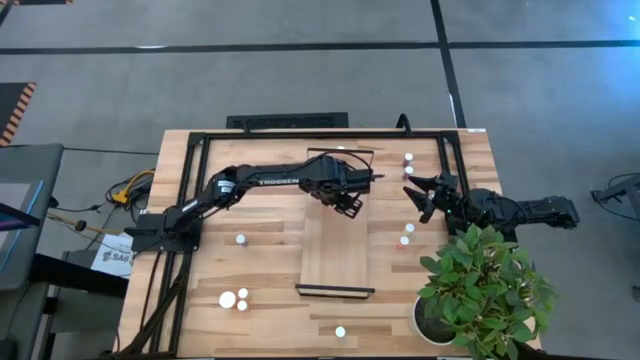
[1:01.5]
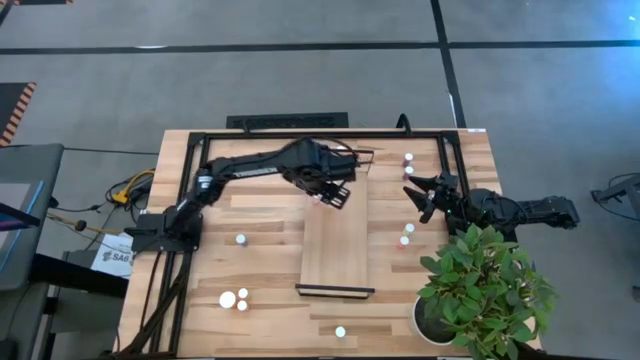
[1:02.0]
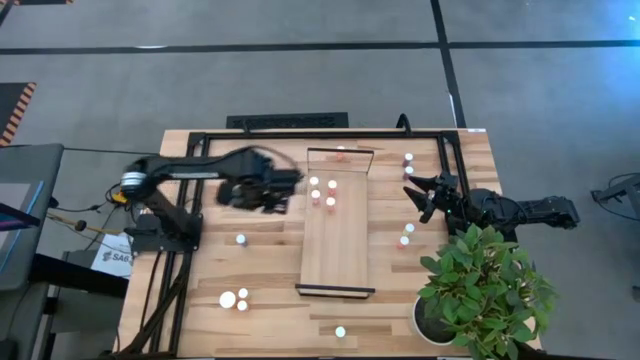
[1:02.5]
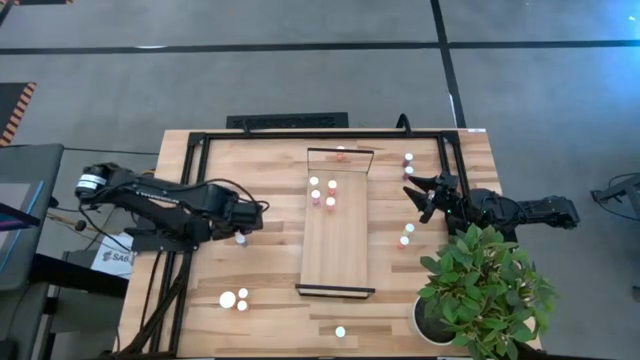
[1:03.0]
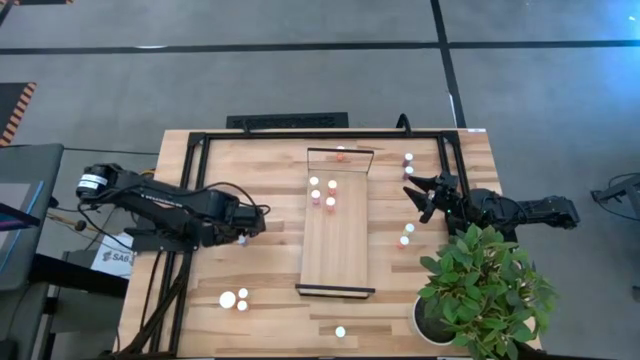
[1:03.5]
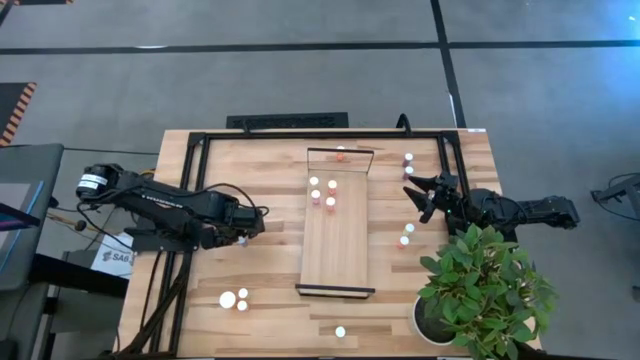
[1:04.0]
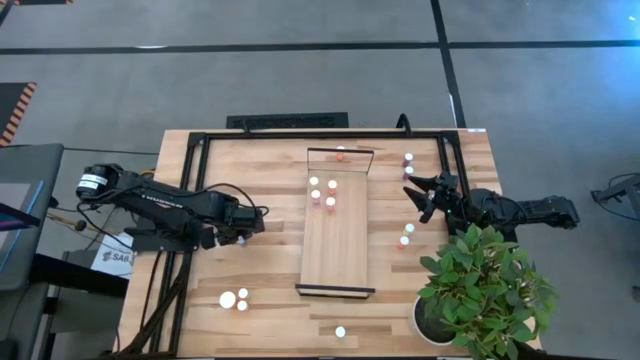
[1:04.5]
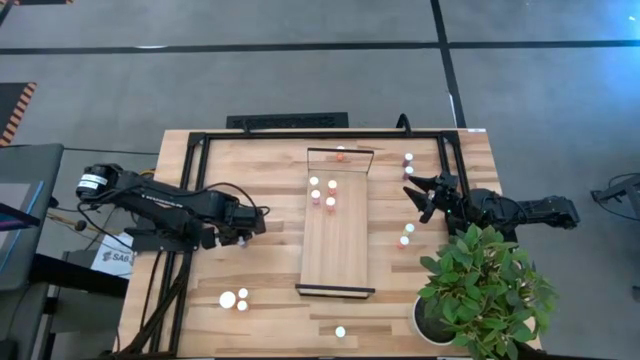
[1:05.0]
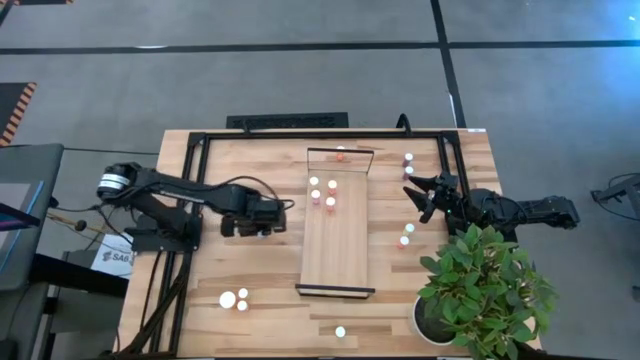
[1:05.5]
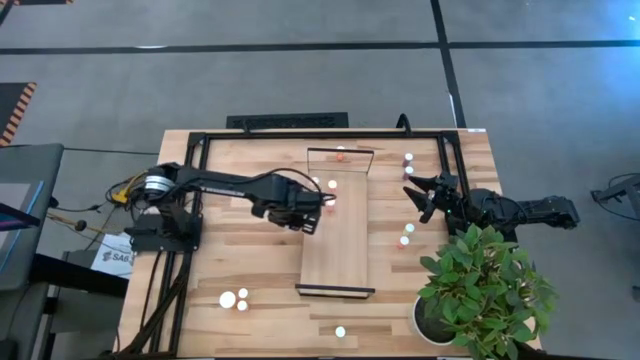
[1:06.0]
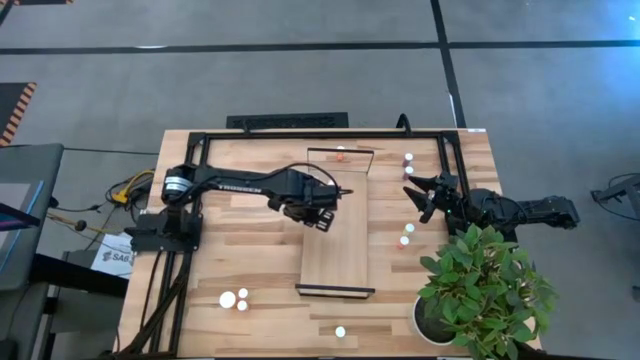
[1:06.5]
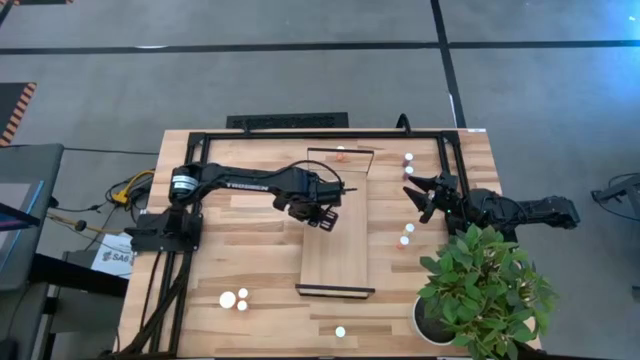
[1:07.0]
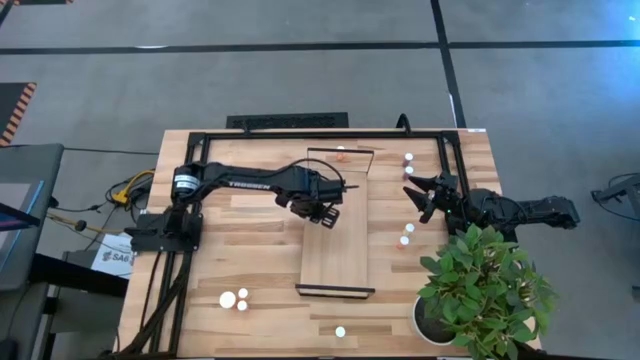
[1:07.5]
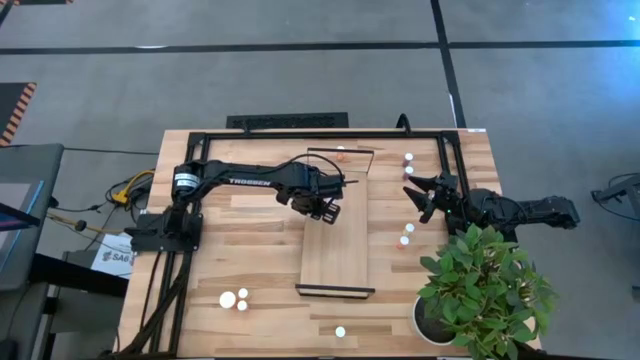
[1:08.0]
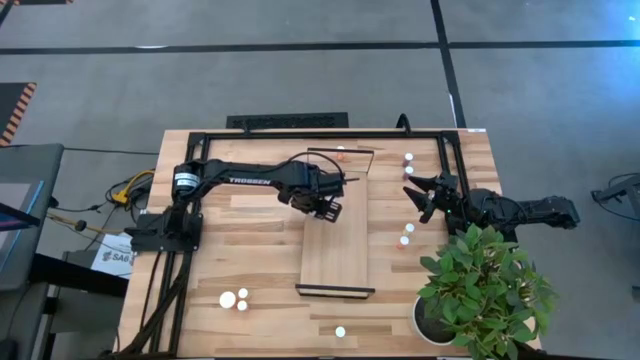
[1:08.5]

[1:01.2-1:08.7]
Task: Pick and place medicine bottles onto shelf by color
Put the blue pill bottle on the shelf

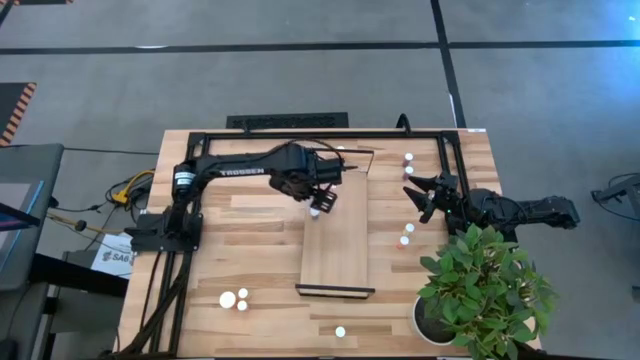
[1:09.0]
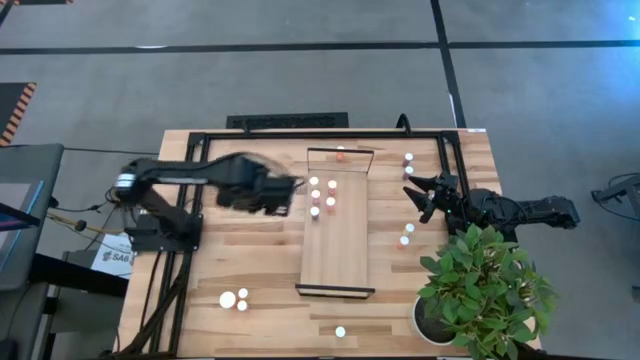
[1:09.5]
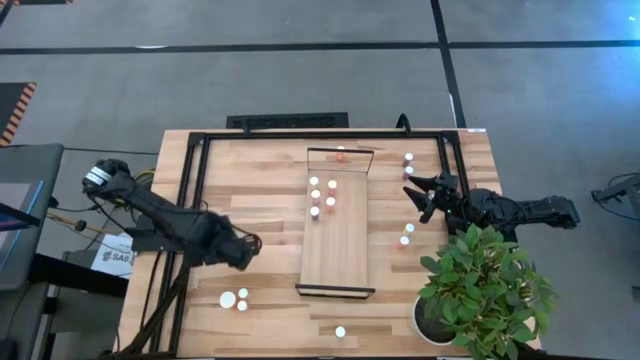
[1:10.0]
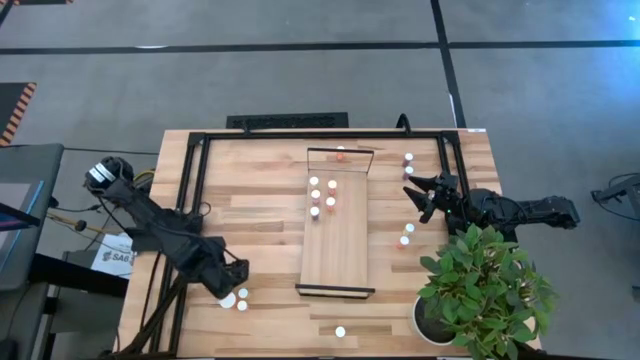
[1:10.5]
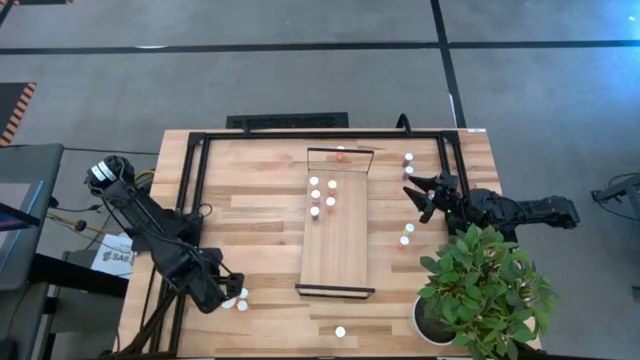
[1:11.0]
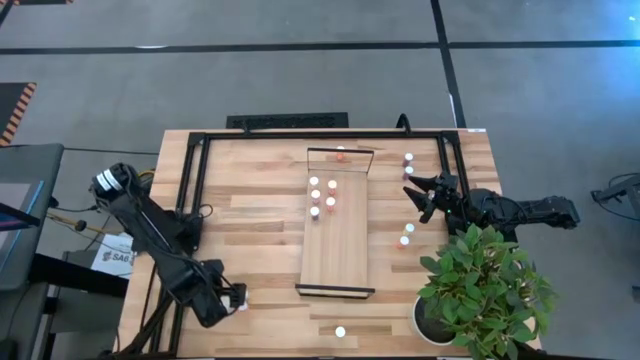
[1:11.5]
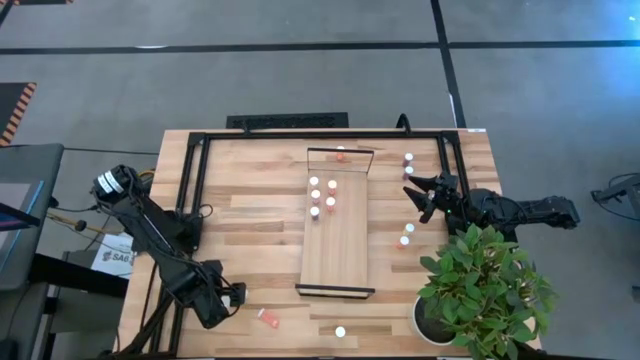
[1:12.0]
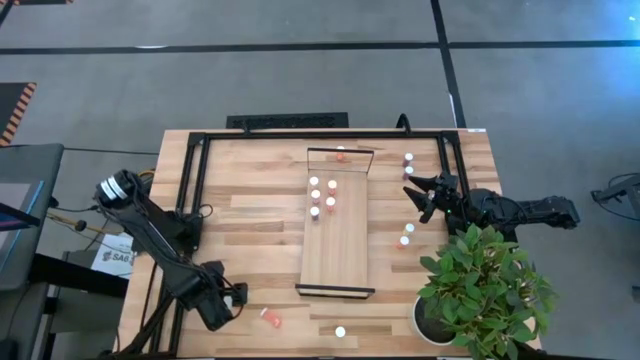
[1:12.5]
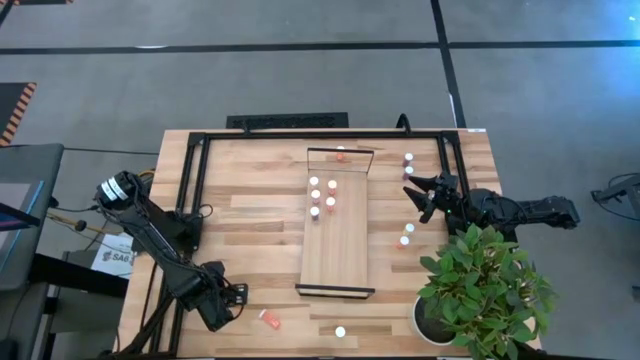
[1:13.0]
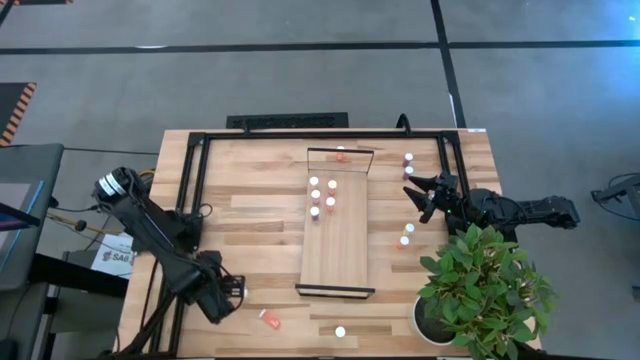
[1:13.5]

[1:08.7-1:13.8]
Put the orange pill bottle on the shelf

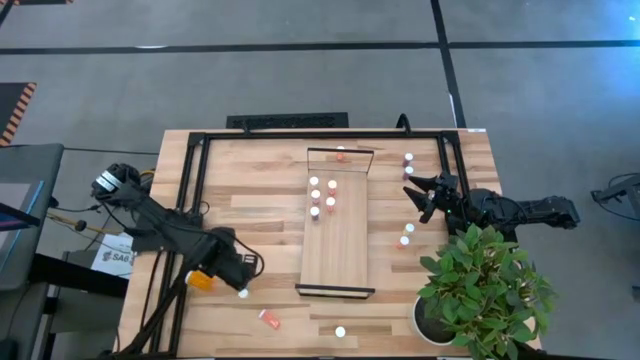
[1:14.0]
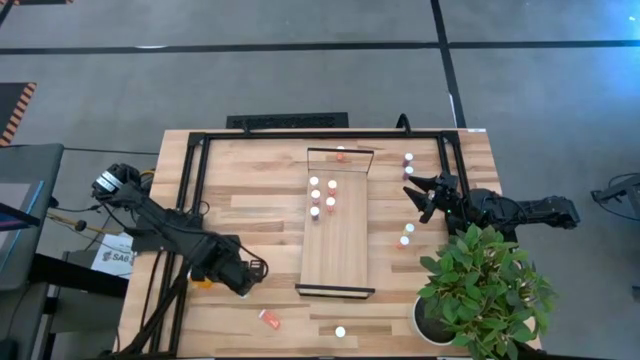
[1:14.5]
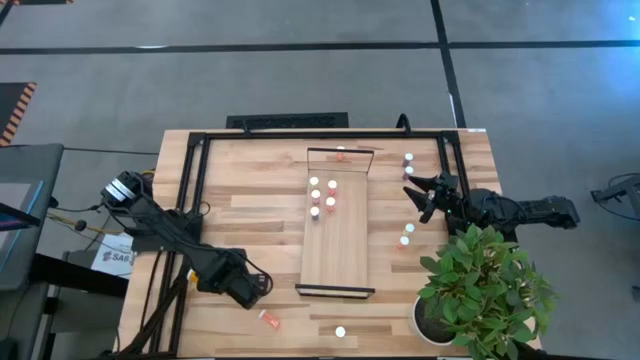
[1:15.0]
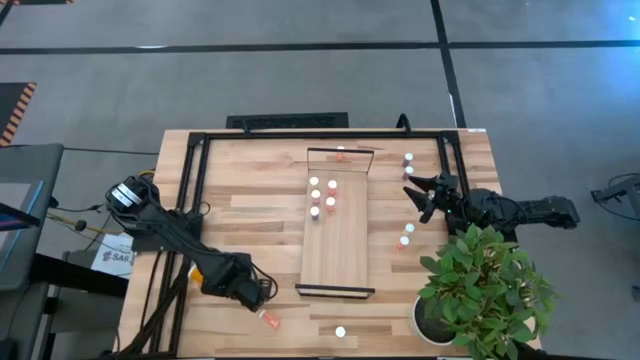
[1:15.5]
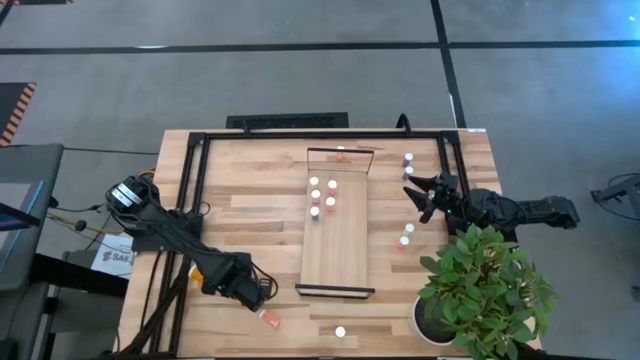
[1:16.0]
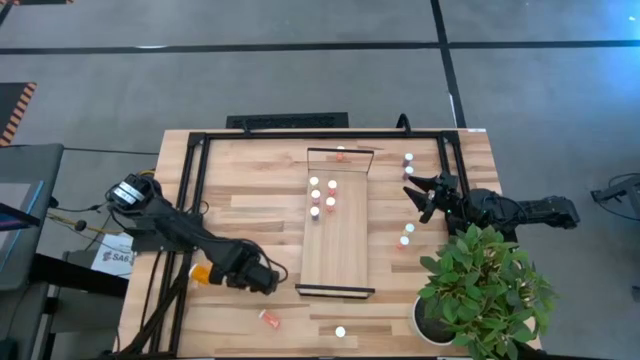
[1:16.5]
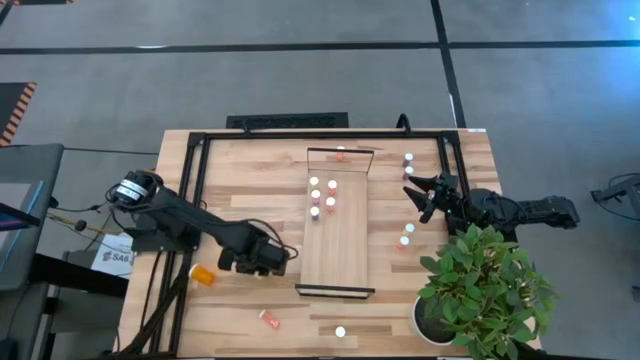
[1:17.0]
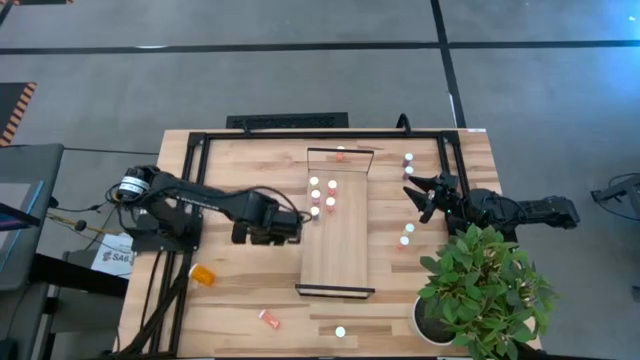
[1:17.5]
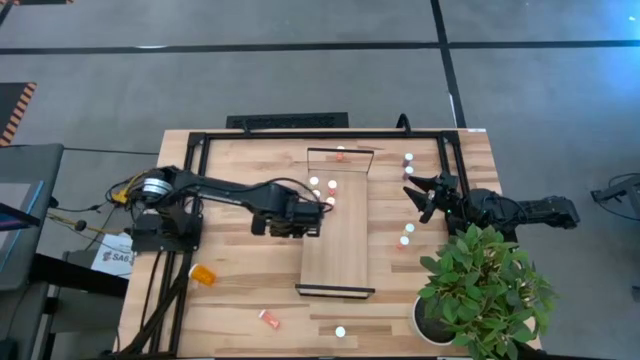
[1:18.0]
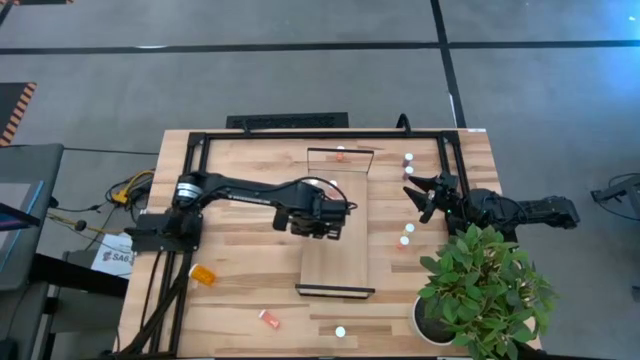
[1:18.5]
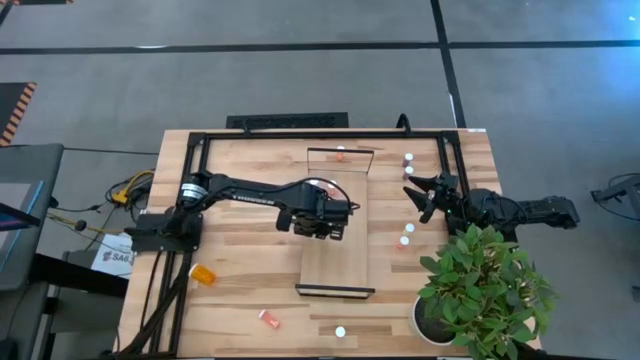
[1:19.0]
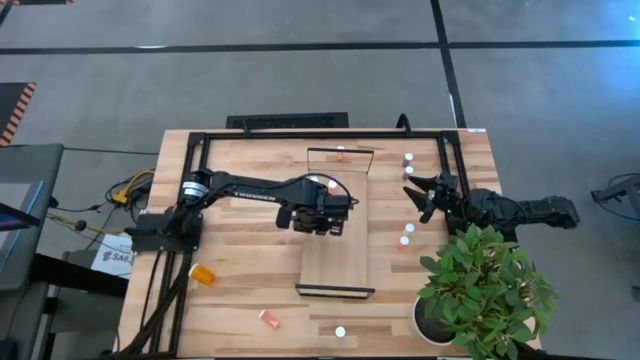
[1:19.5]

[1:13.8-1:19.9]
Put the yellow pill bottle on the shelf

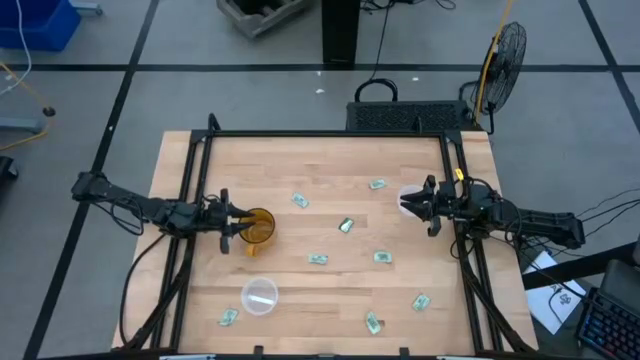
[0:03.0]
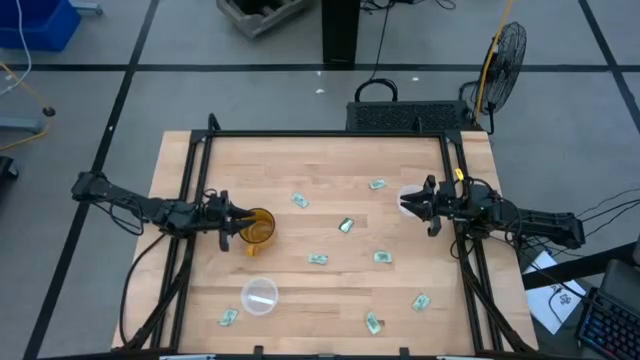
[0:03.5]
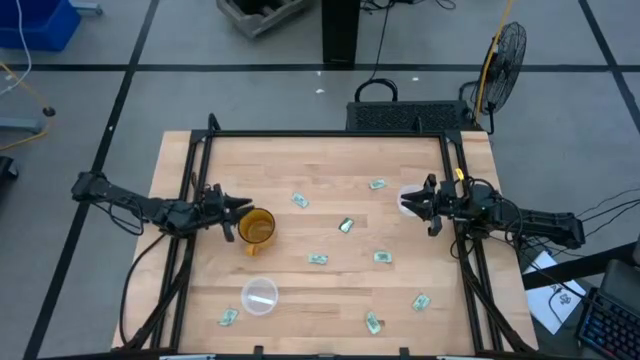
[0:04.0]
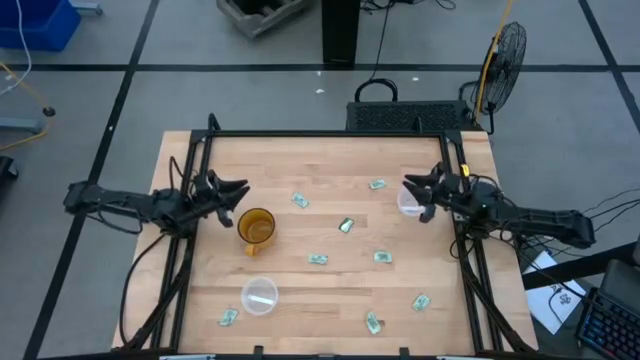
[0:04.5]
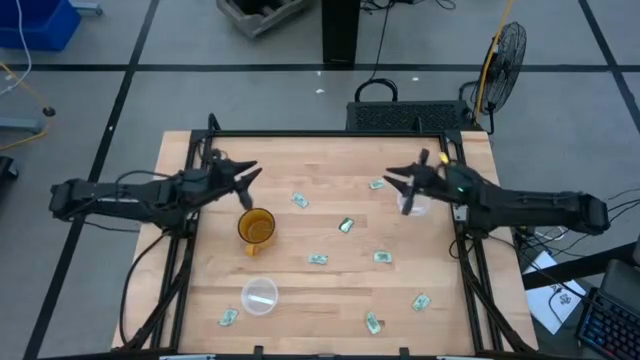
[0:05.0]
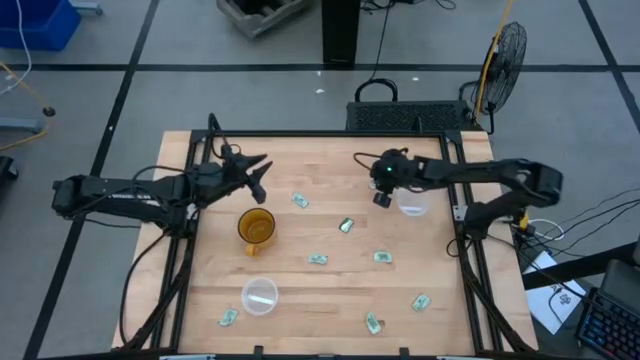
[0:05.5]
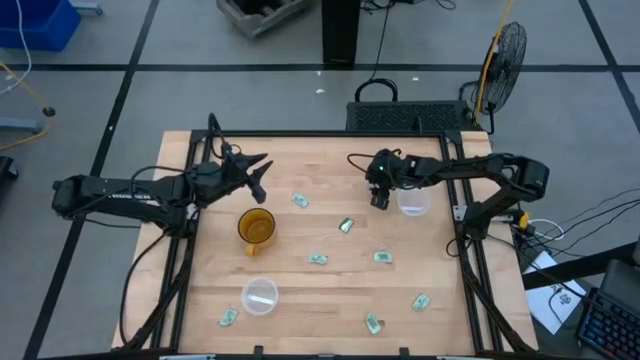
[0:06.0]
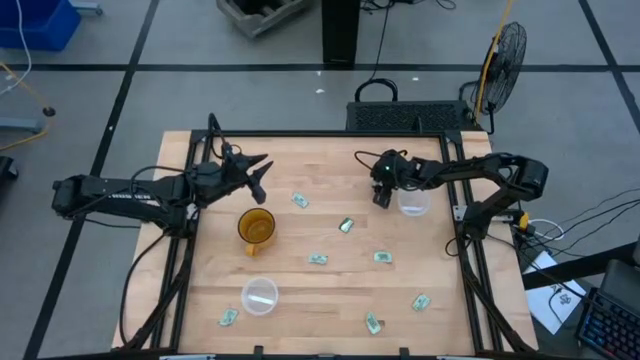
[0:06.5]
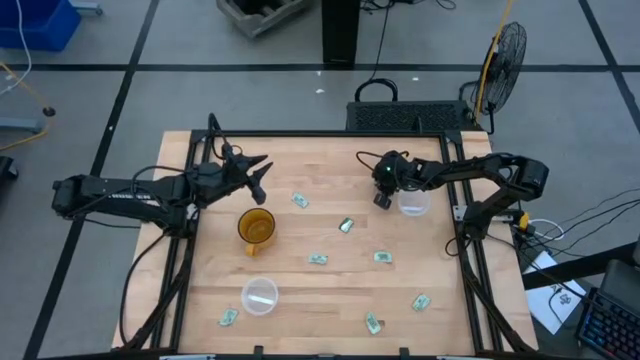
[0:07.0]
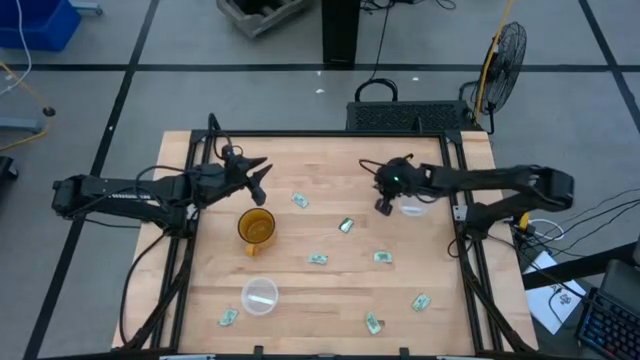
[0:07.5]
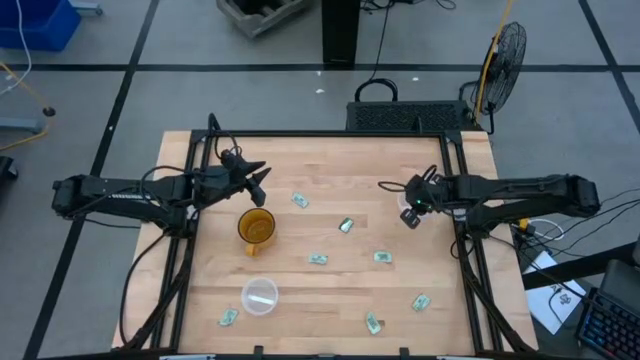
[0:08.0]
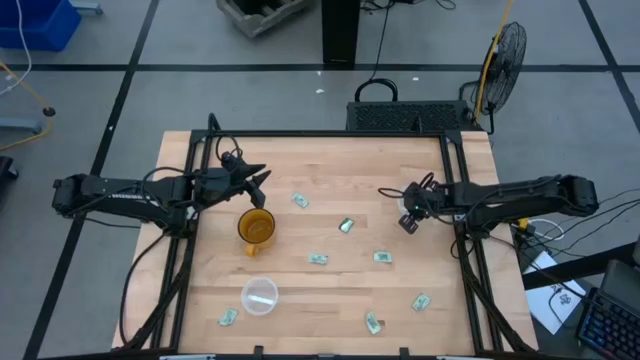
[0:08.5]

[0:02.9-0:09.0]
Task: Pick and place Stevia / Truvia into bins
Put the stevia packet into the top transparent container
